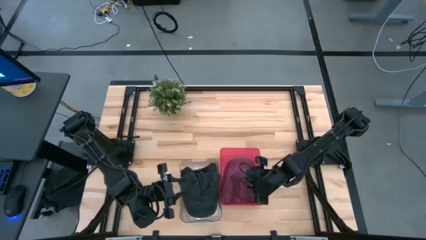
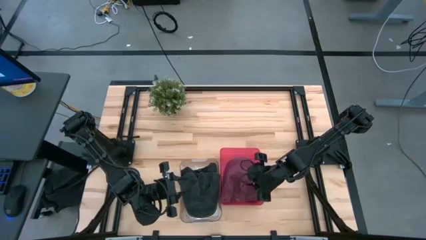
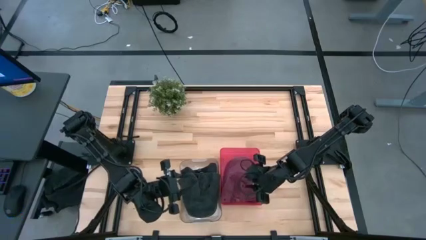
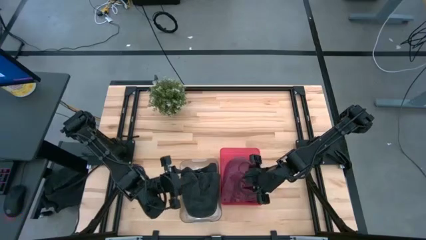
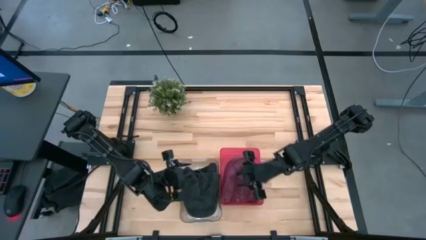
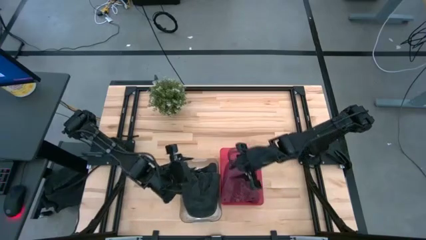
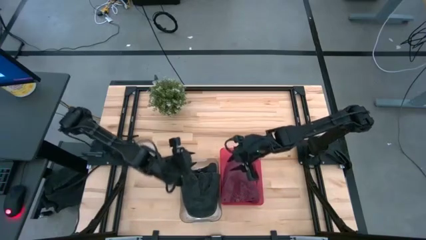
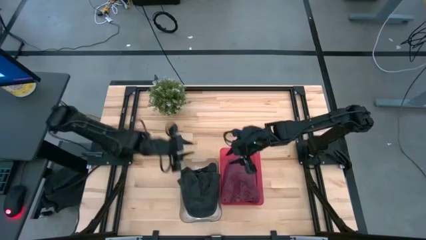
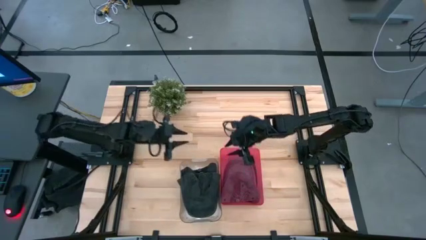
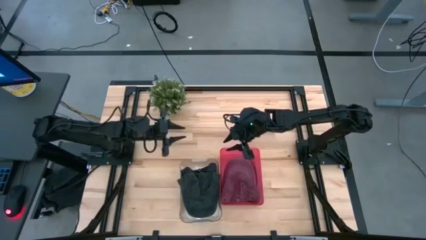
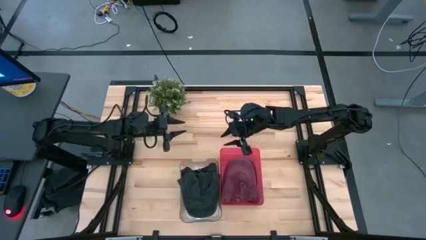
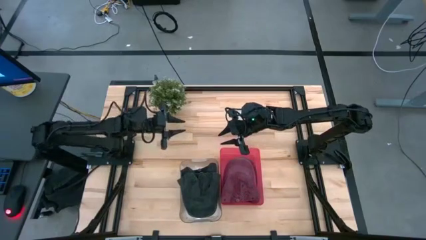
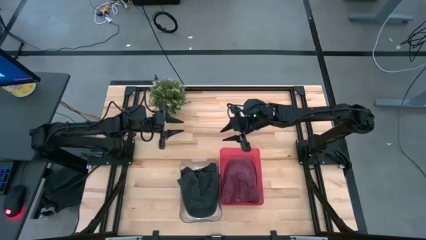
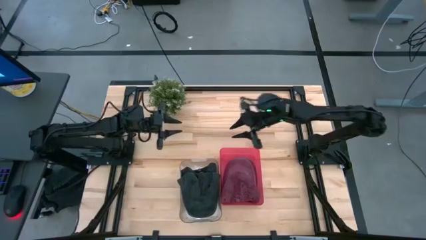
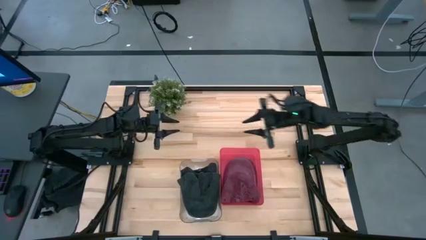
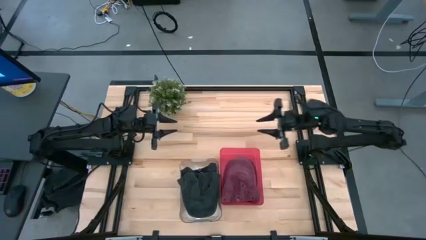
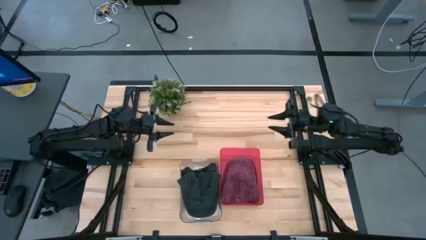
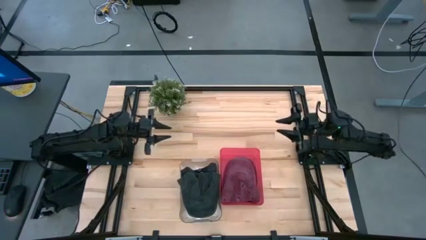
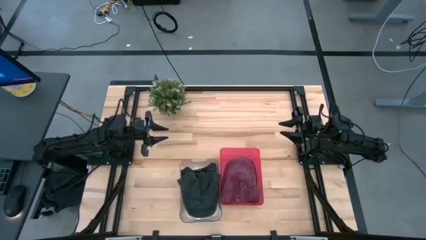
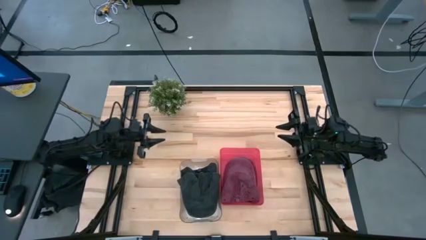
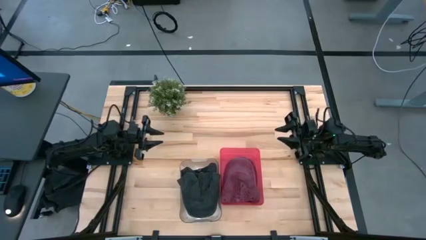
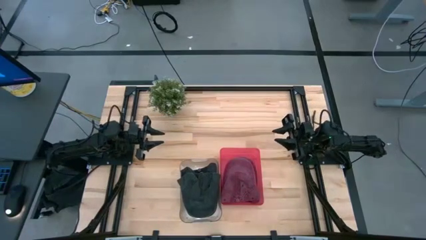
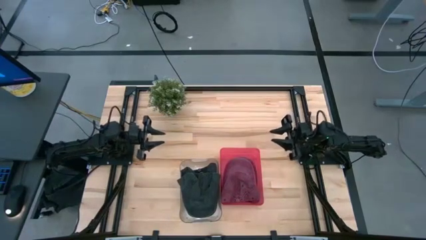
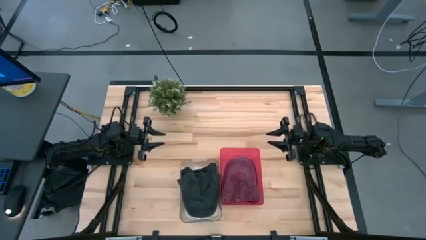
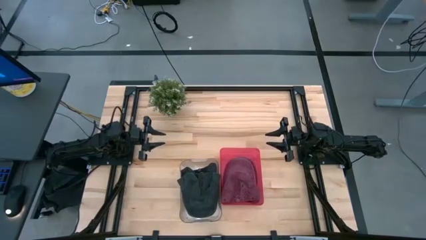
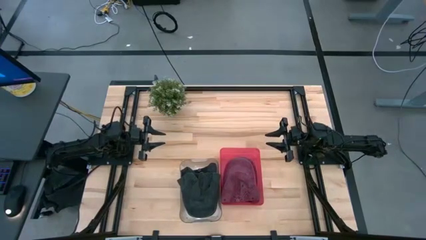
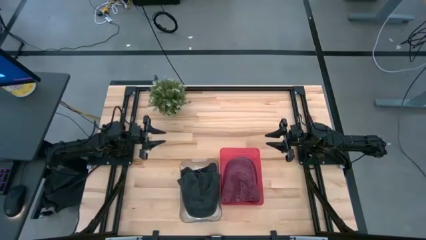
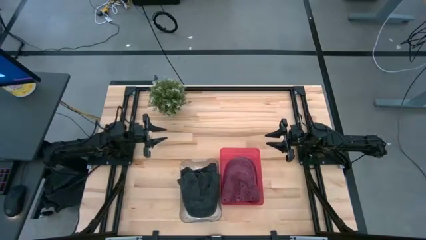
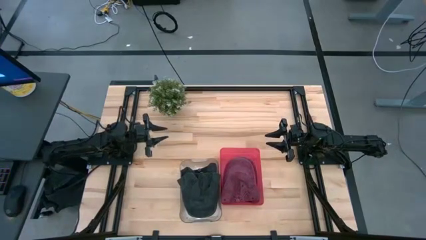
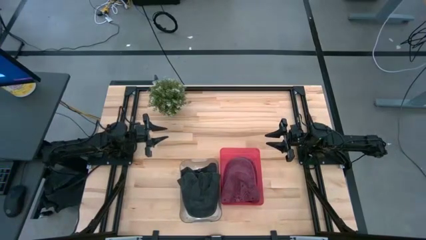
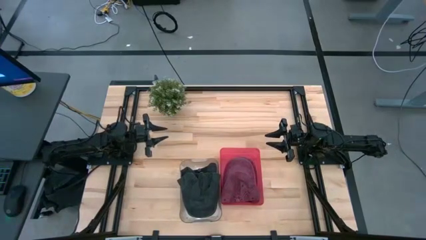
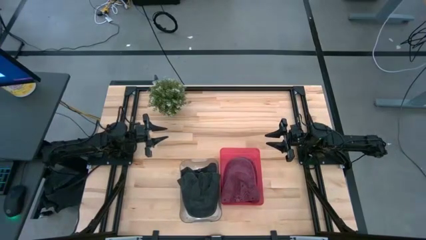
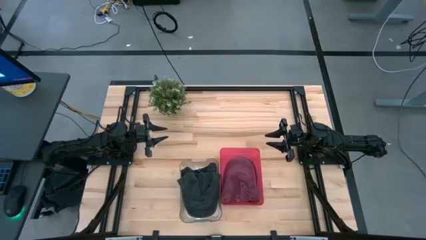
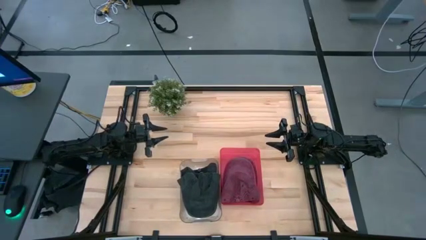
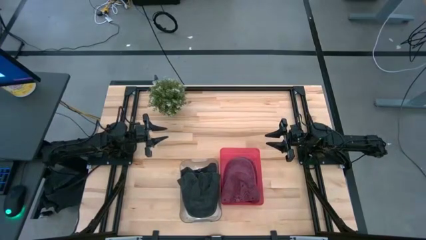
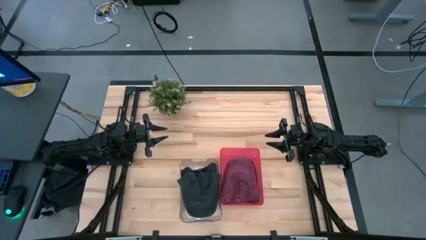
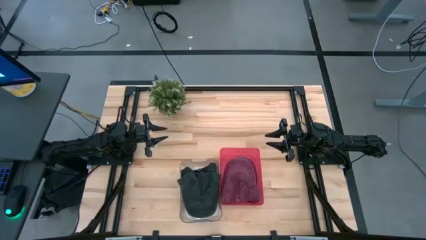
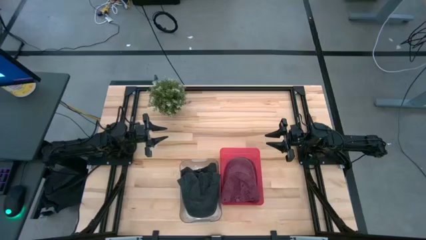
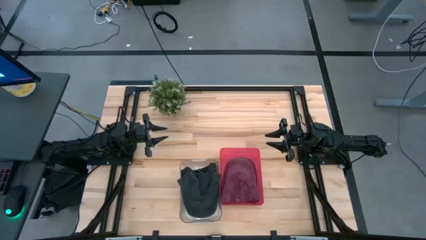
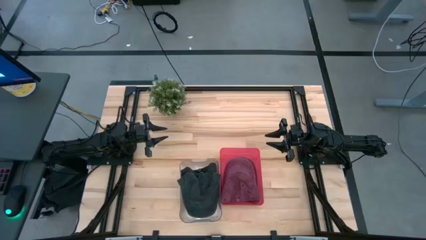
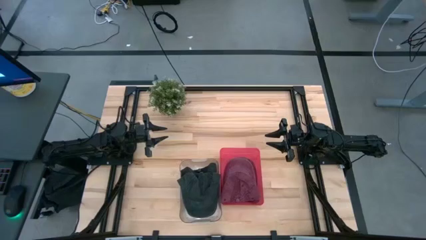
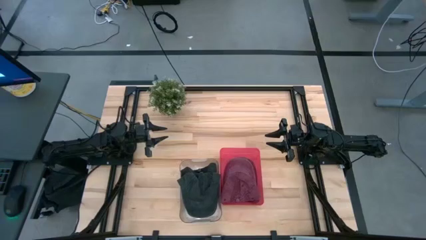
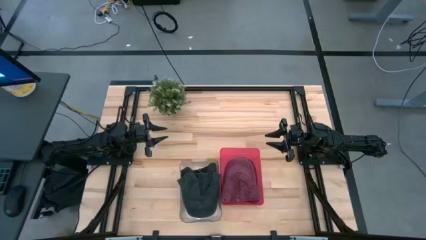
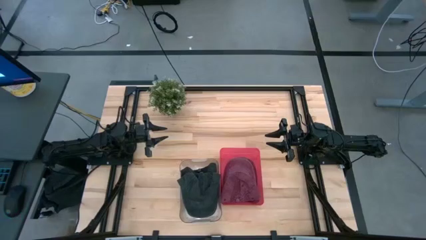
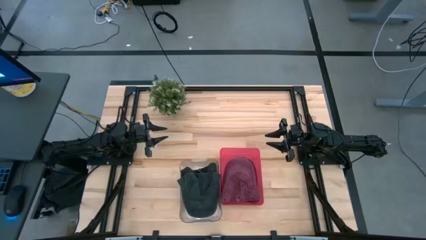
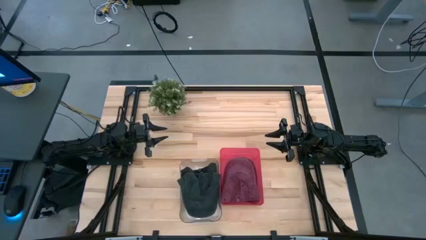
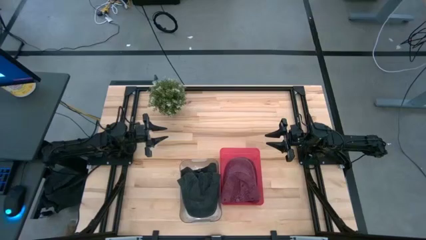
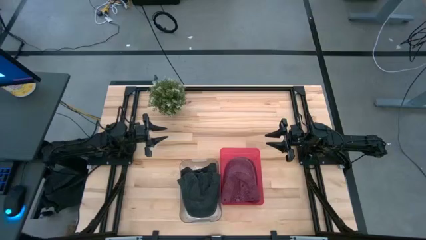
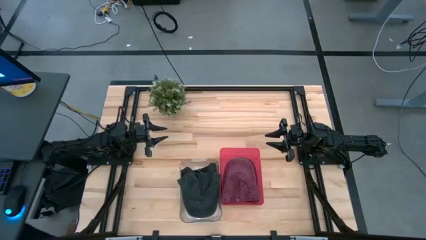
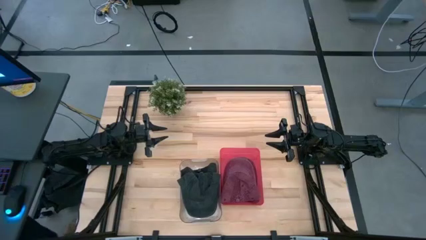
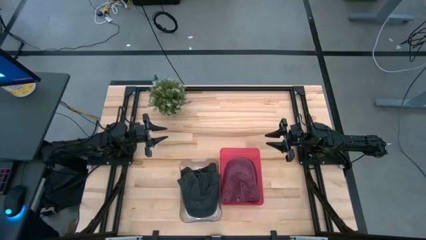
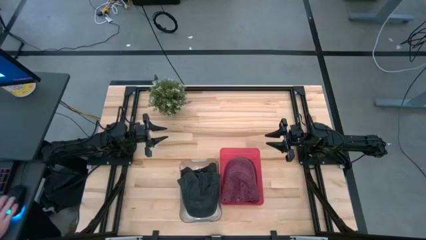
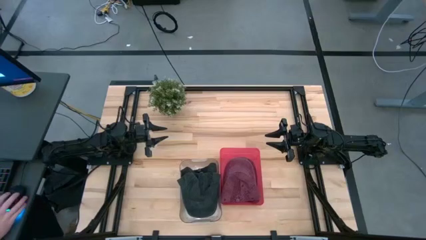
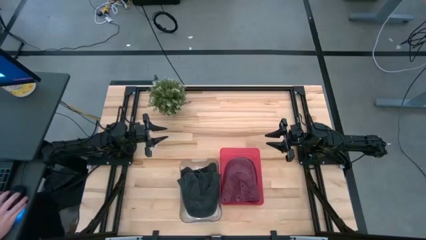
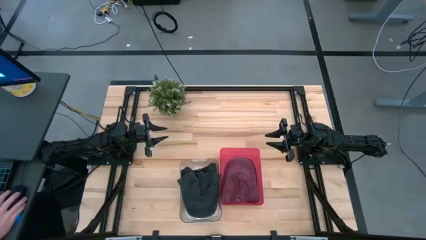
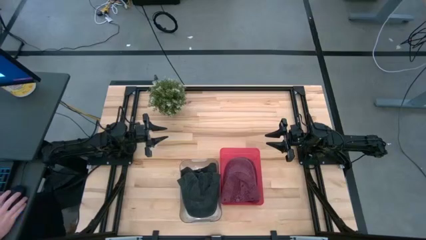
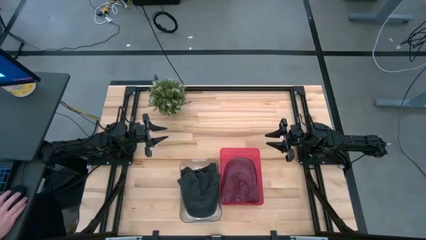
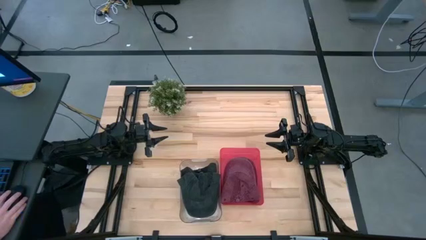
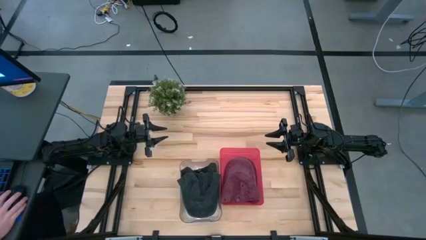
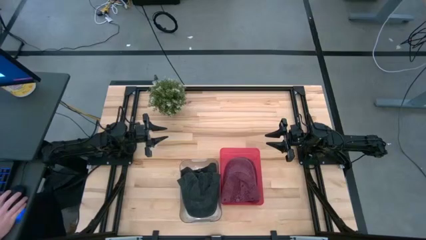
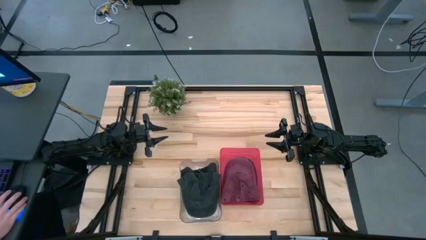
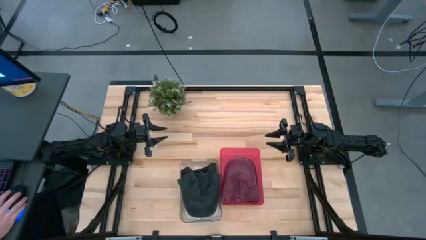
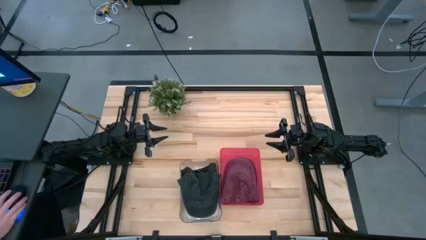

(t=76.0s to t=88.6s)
Task: Pick & Place hat
Return to Home Position

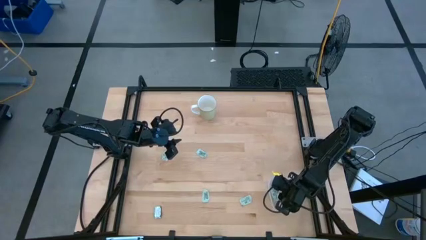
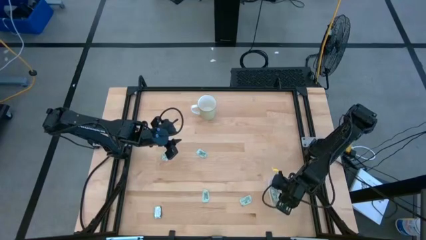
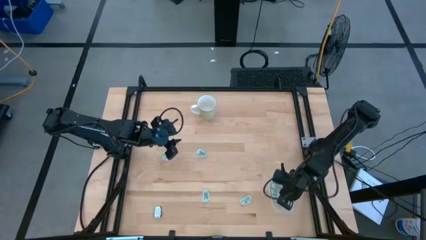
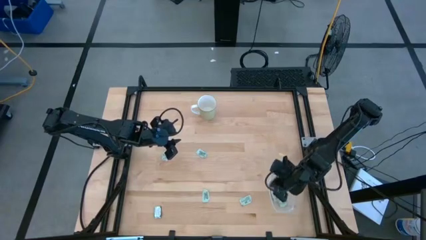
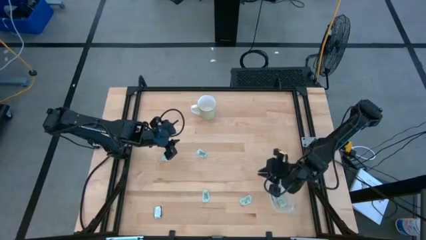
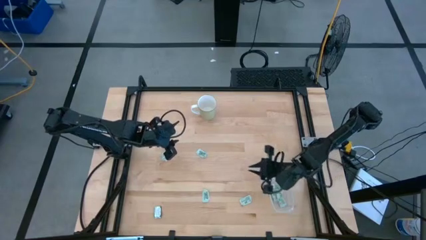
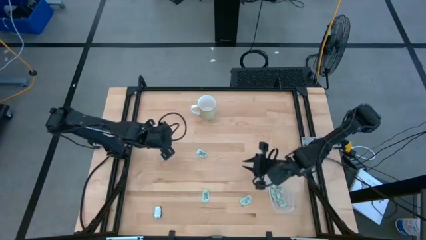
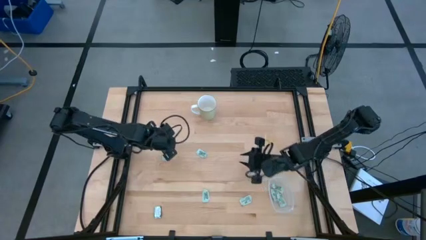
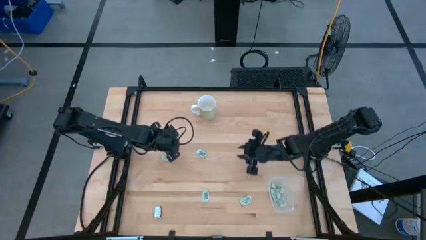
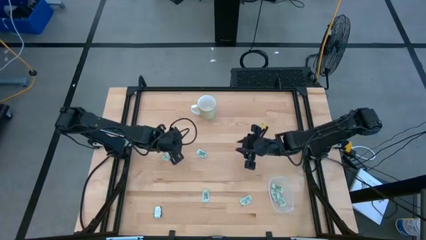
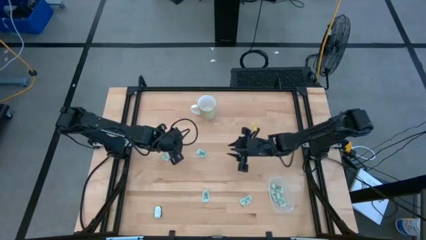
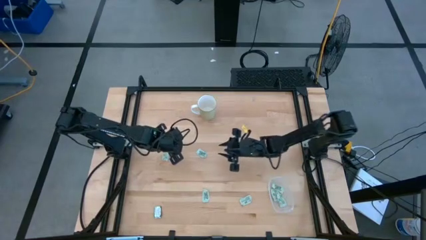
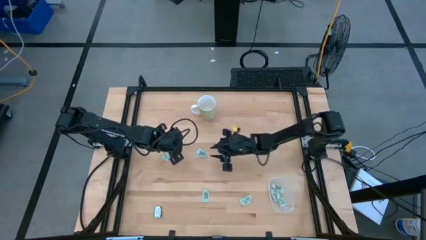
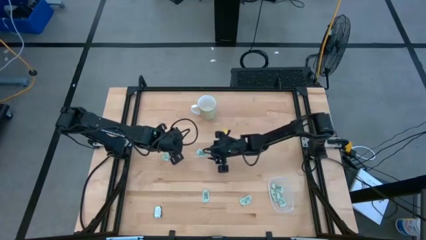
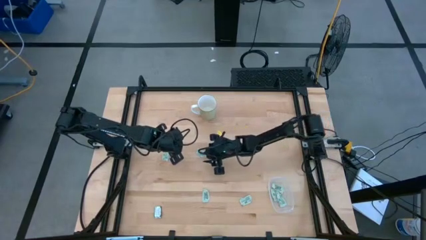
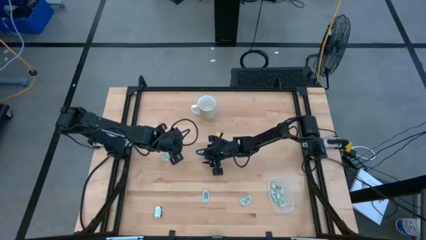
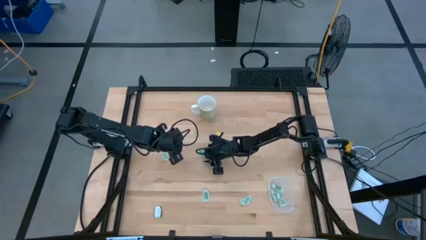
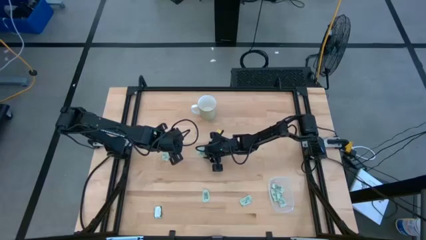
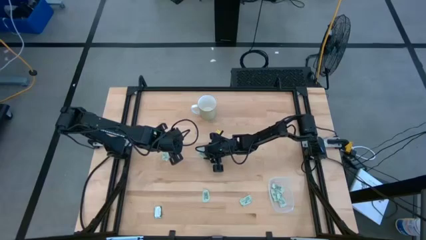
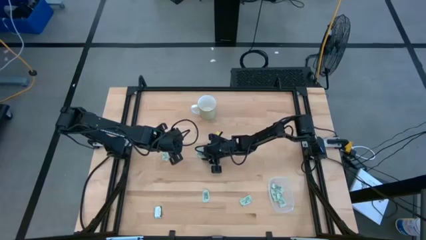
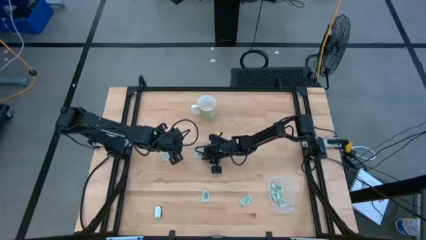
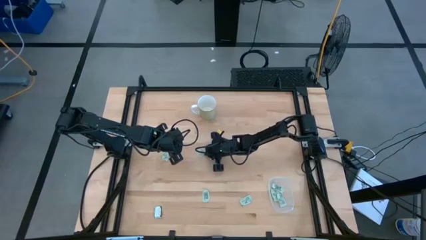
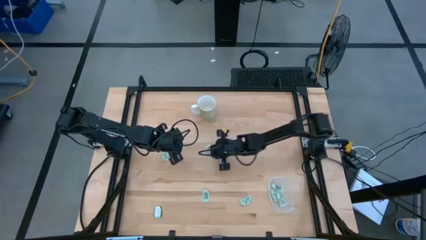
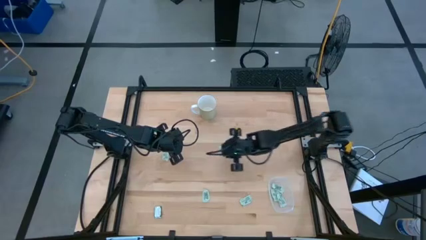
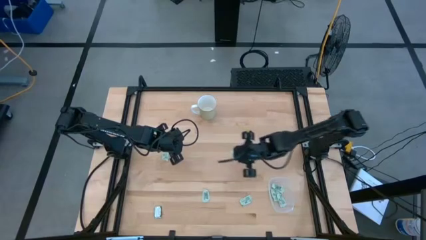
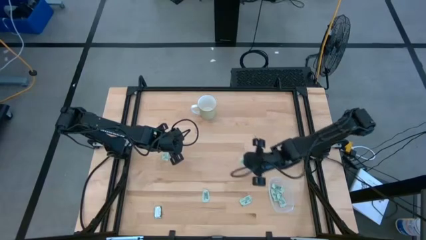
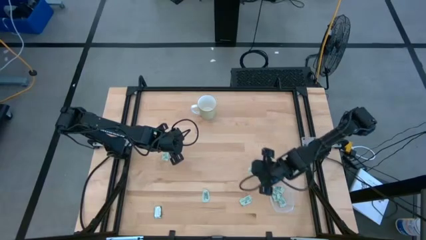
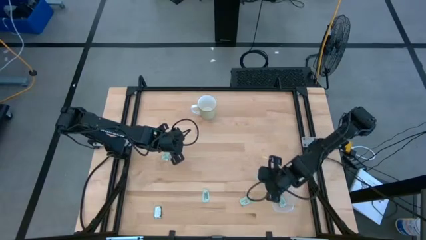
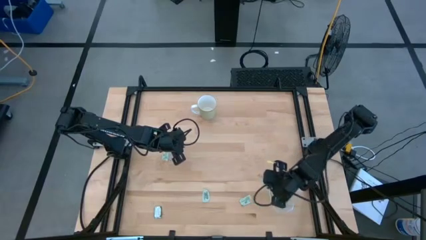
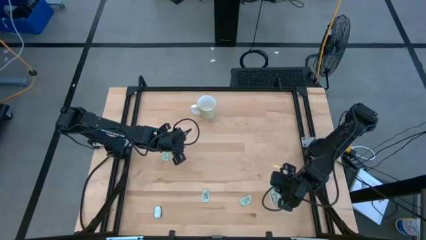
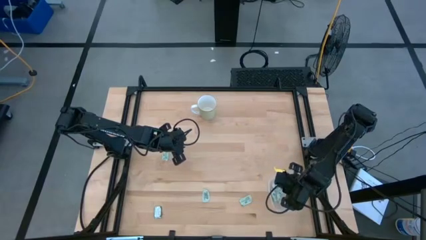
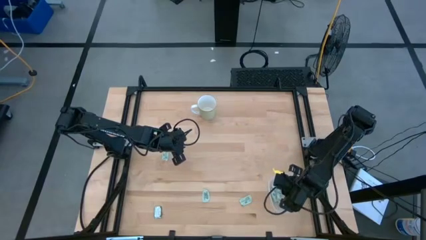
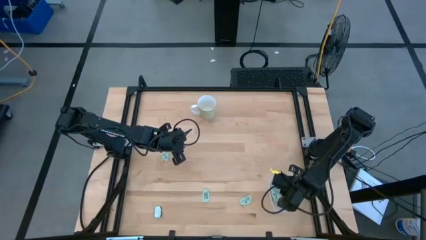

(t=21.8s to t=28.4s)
Task: Pick and place Stevia / Truvia into bins
Put the stevia packet into the transparent bin
